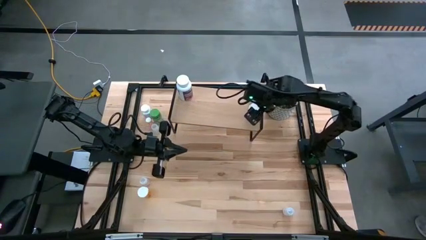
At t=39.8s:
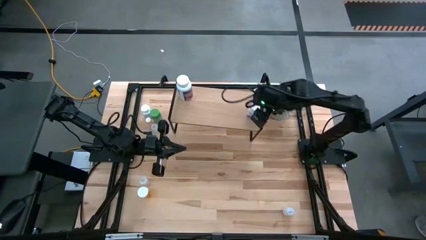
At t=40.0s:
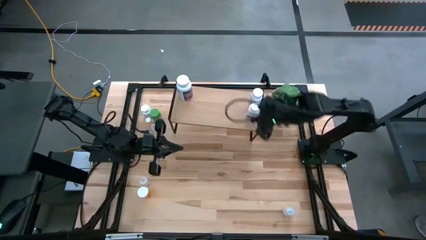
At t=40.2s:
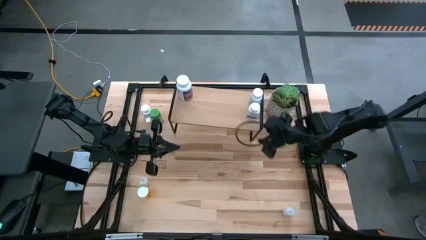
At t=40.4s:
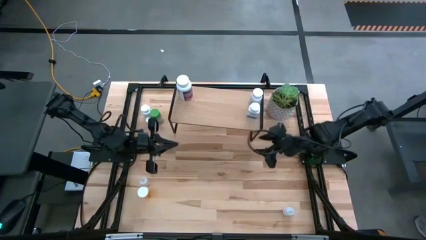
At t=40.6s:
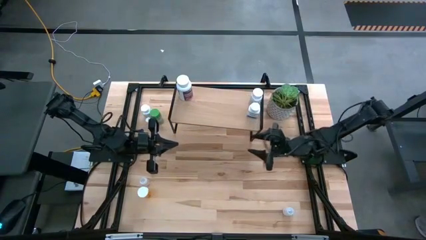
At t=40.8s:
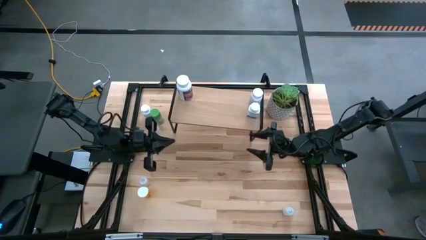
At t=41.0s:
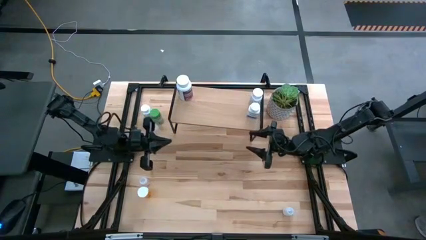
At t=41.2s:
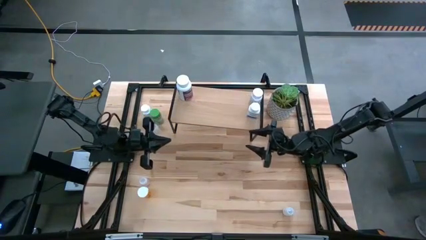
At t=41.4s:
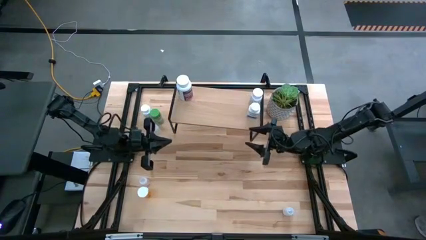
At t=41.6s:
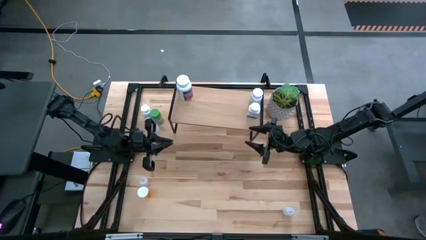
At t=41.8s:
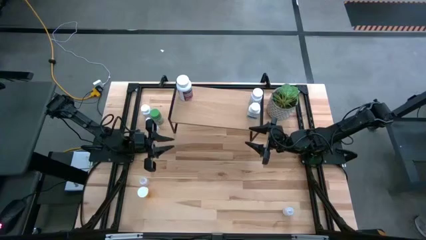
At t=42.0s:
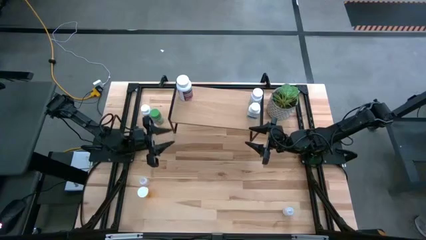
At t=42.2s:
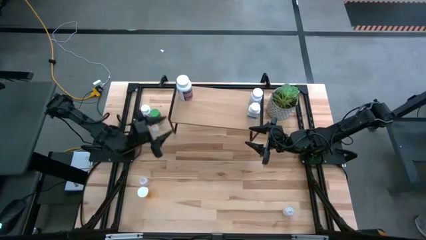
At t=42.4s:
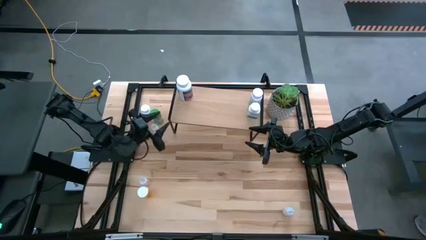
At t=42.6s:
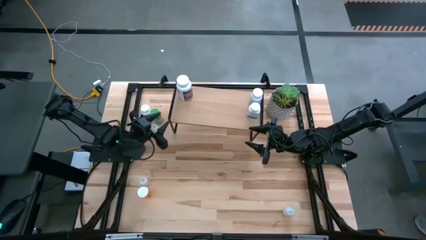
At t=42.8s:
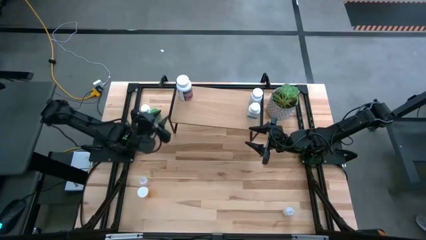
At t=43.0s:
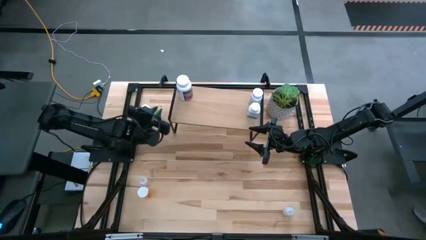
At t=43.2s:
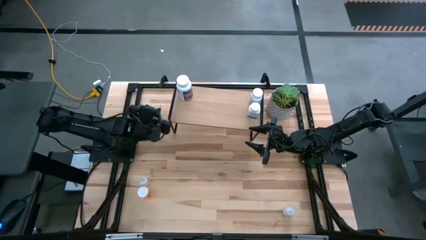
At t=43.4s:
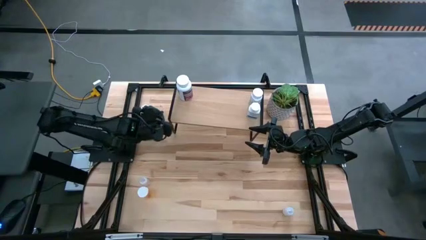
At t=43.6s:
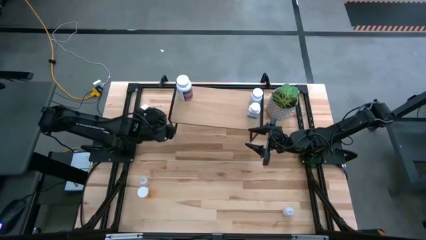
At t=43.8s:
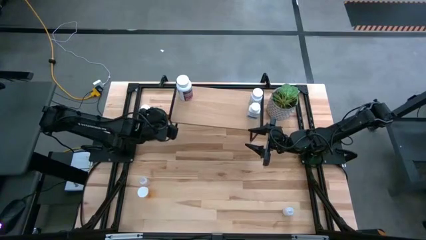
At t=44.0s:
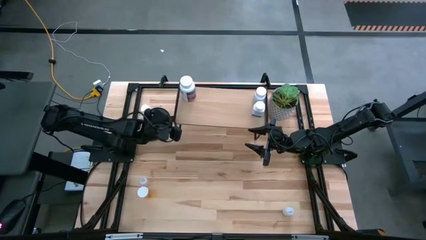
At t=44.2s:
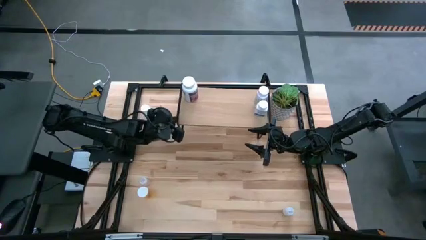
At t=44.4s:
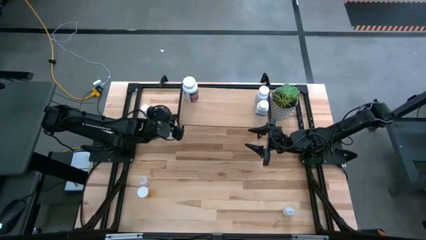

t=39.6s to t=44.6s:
Task: Pick and place medicine bottles onto shelf by color
Adjust the shelf on the table

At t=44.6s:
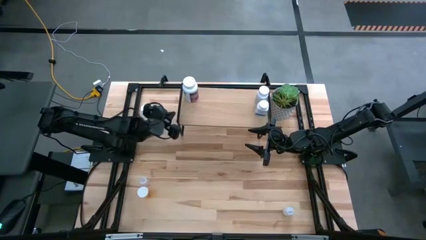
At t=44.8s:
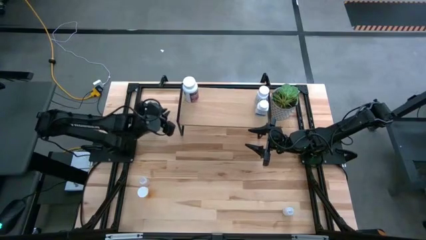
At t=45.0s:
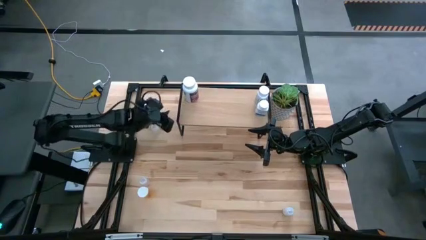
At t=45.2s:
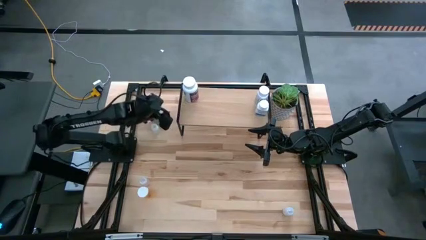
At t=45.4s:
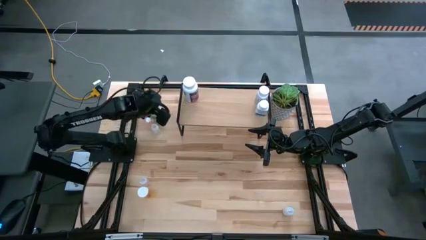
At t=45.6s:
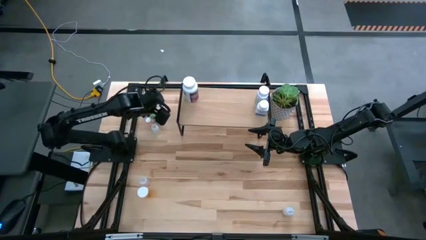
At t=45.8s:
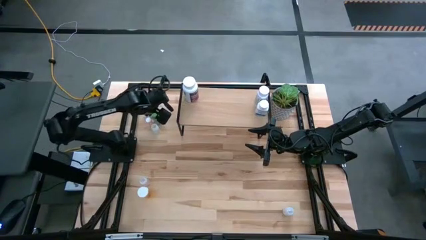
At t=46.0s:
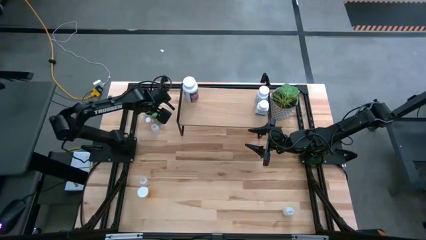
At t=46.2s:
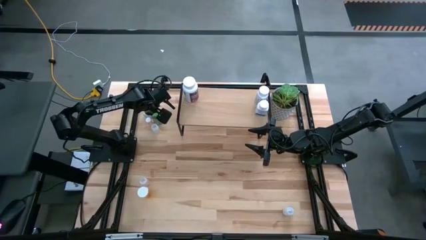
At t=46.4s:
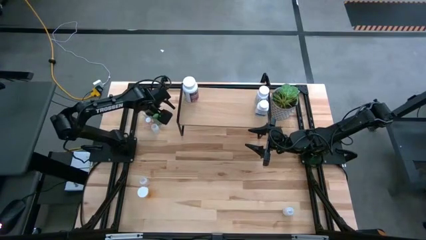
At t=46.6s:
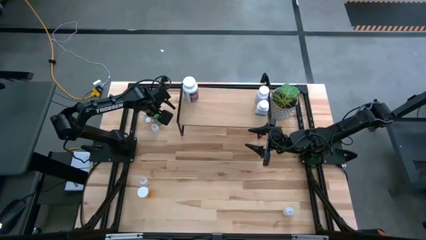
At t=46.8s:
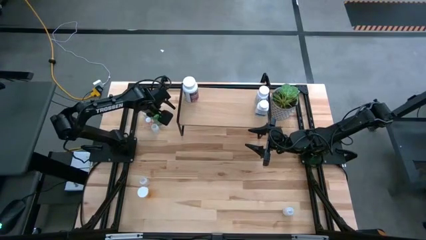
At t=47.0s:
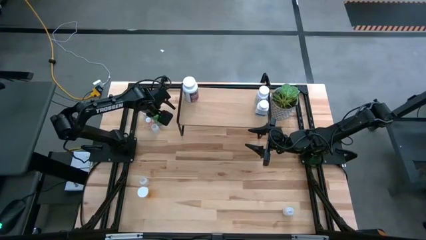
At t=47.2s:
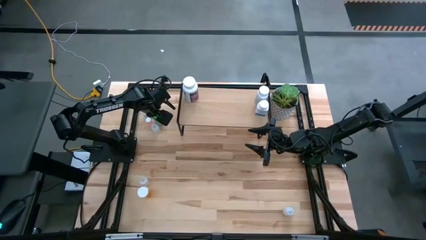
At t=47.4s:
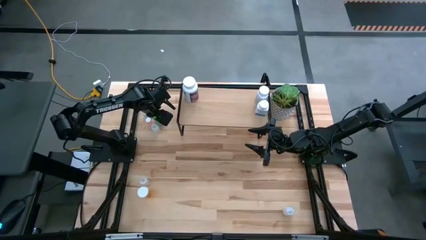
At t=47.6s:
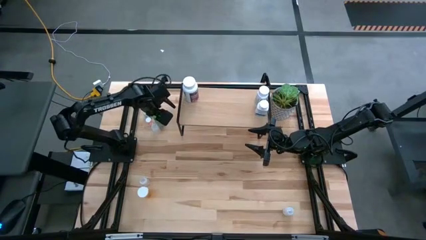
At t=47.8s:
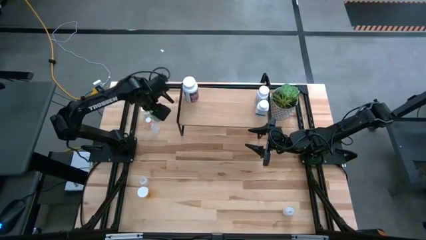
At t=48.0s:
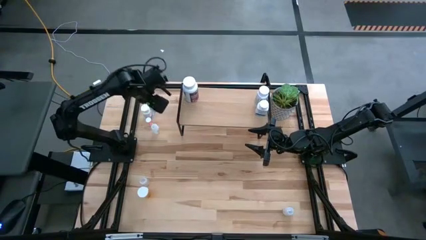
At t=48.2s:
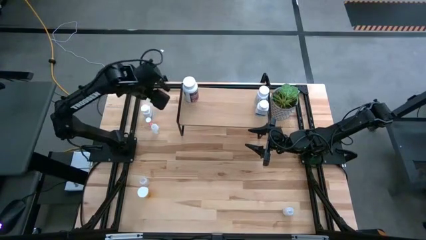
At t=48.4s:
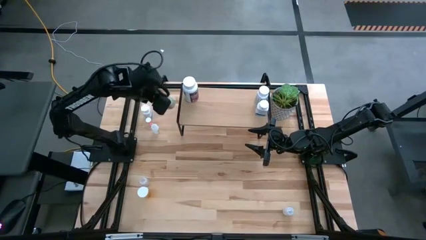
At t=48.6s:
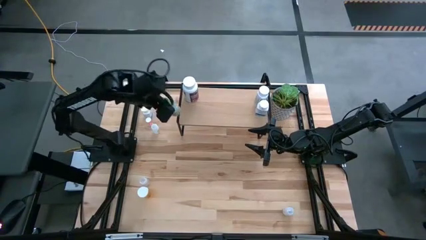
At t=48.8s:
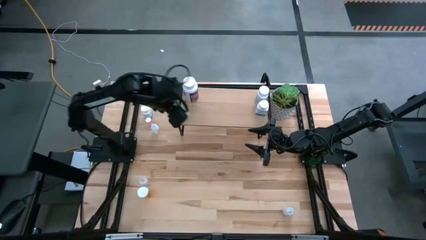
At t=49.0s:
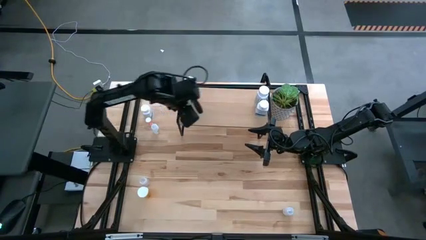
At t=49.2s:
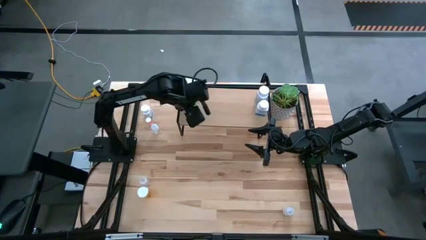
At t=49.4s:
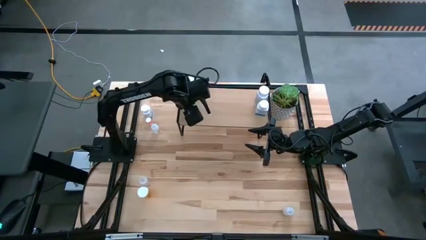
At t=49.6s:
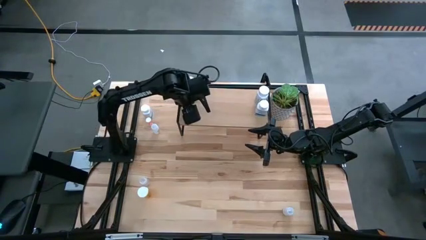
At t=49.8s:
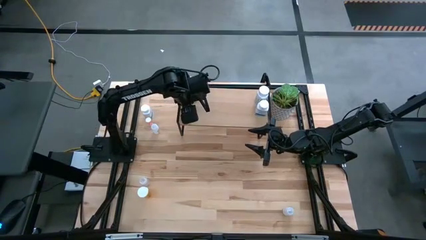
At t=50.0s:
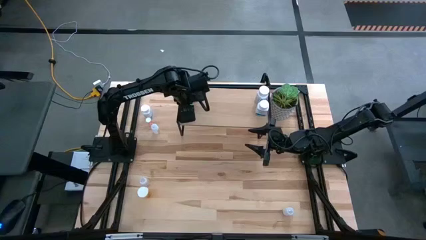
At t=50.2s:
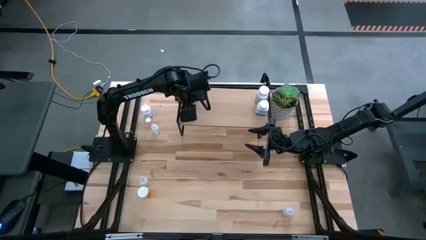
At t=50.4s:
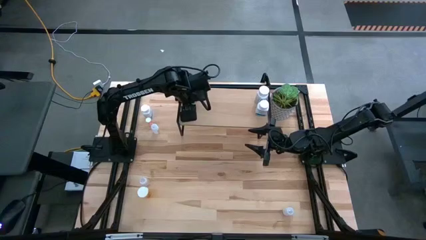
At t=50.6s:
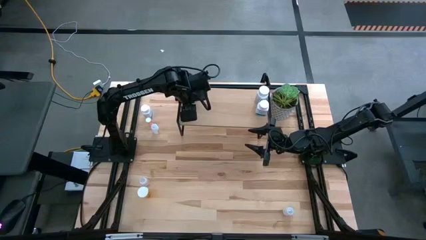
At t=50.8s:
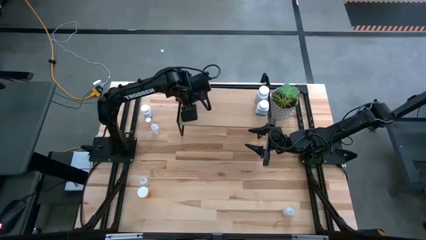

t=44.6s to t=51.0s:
Put the green medicine bottle on the shelf
